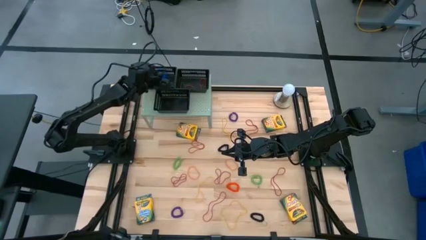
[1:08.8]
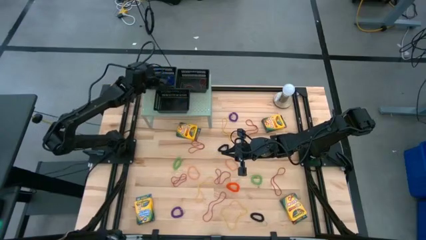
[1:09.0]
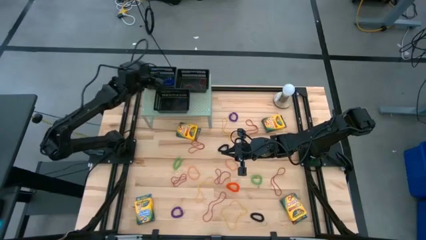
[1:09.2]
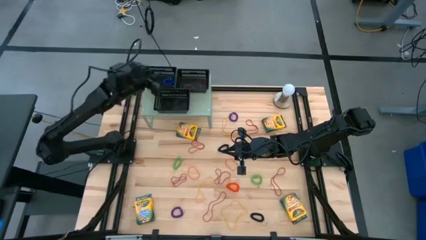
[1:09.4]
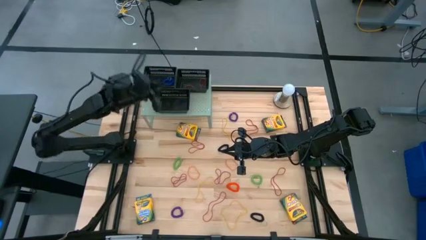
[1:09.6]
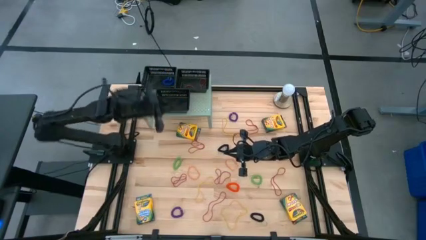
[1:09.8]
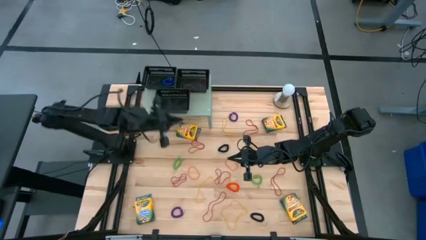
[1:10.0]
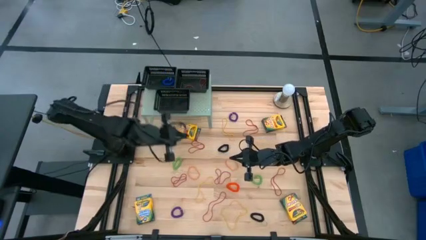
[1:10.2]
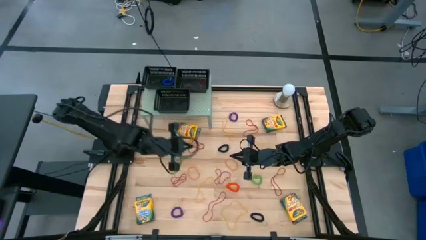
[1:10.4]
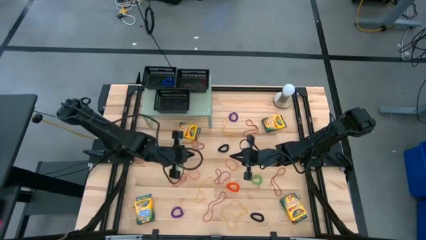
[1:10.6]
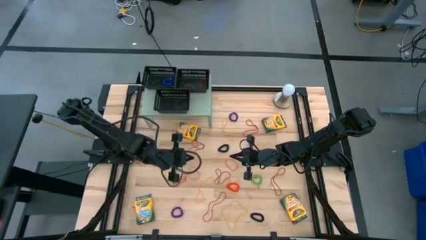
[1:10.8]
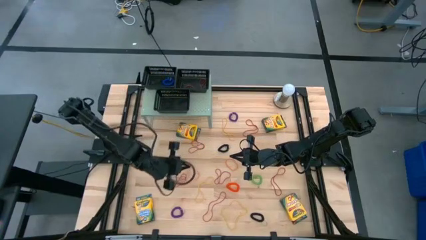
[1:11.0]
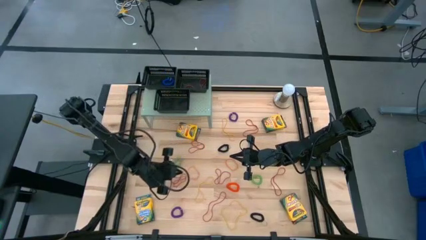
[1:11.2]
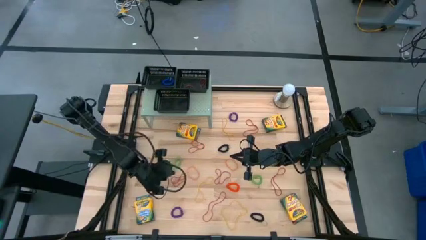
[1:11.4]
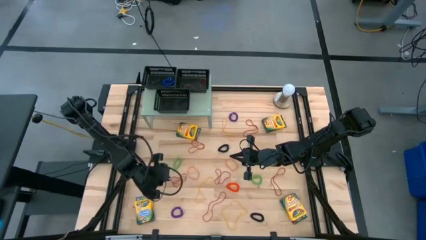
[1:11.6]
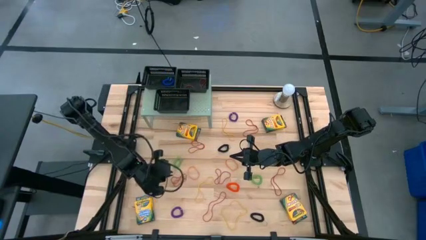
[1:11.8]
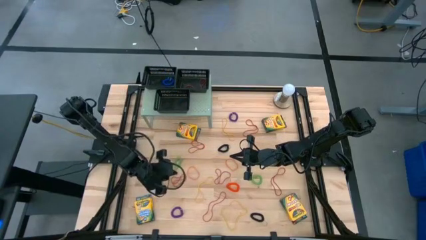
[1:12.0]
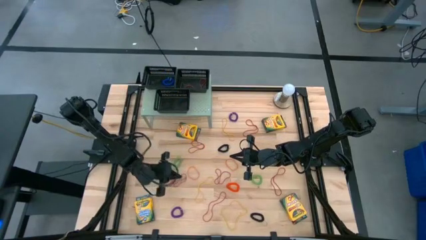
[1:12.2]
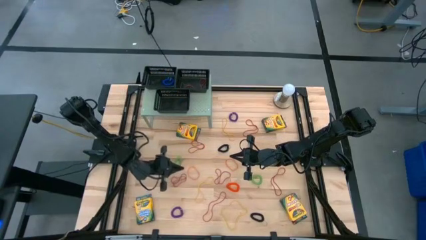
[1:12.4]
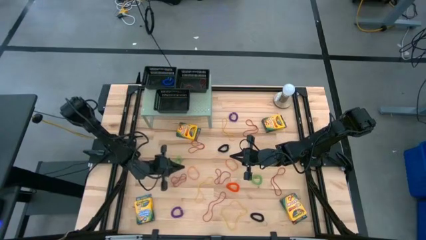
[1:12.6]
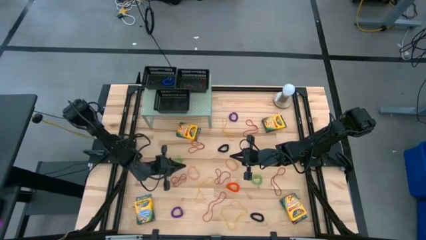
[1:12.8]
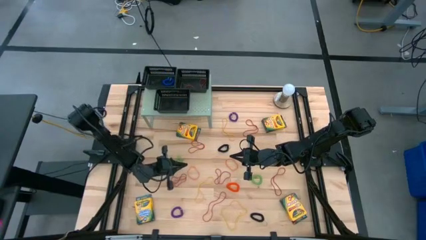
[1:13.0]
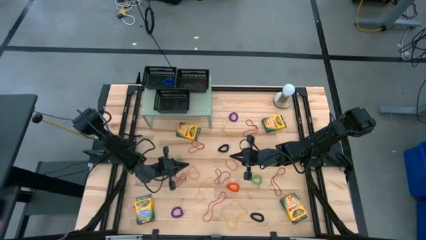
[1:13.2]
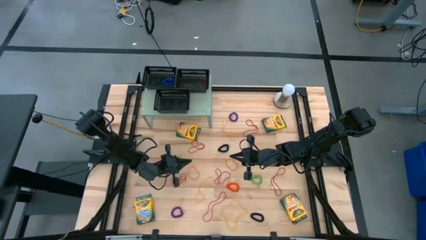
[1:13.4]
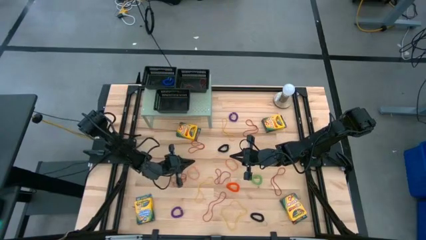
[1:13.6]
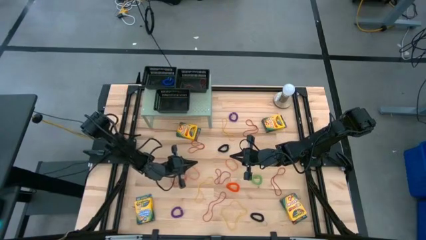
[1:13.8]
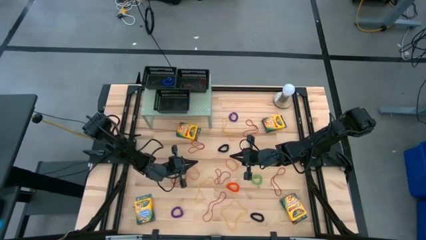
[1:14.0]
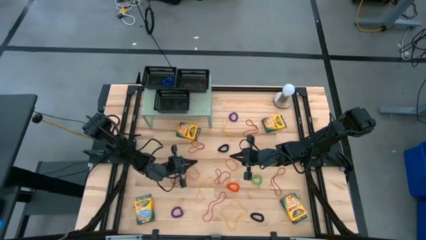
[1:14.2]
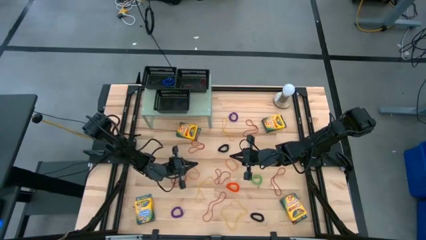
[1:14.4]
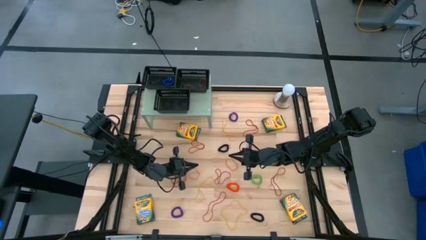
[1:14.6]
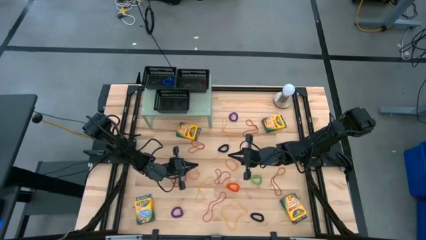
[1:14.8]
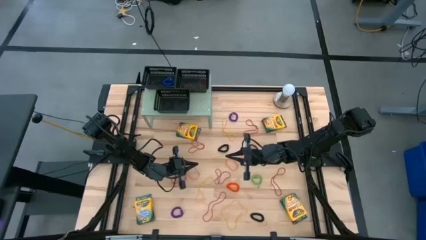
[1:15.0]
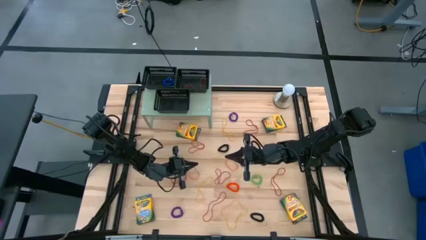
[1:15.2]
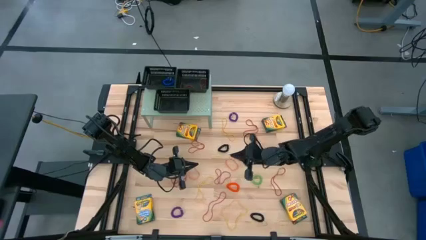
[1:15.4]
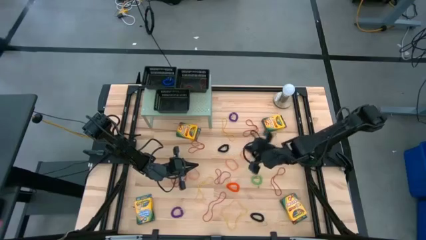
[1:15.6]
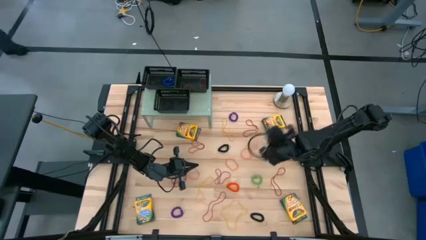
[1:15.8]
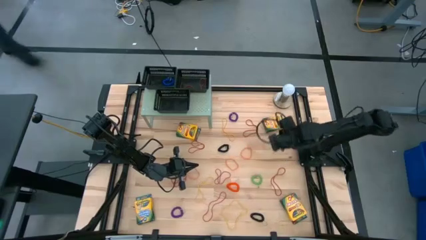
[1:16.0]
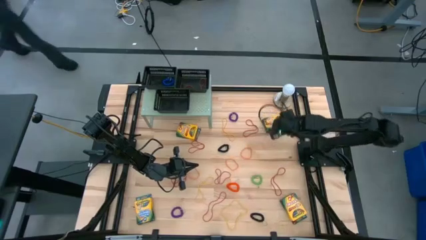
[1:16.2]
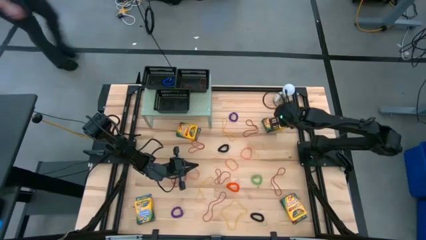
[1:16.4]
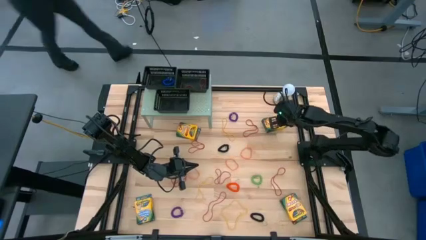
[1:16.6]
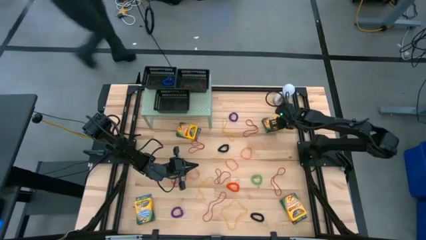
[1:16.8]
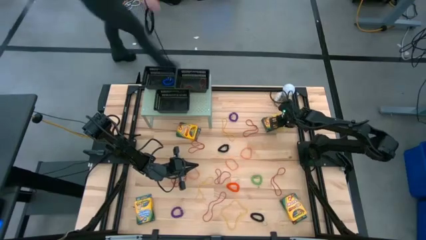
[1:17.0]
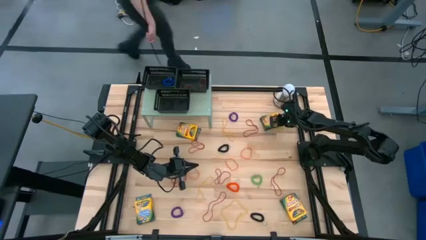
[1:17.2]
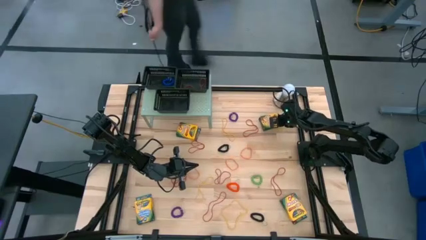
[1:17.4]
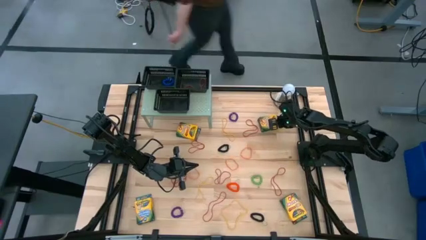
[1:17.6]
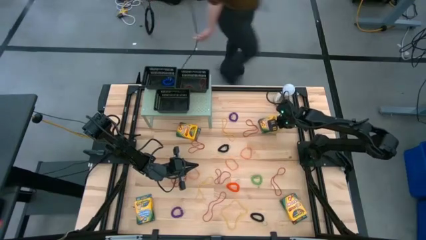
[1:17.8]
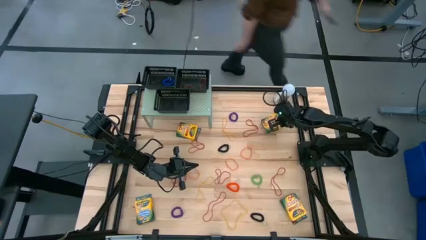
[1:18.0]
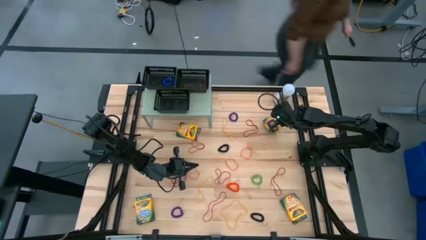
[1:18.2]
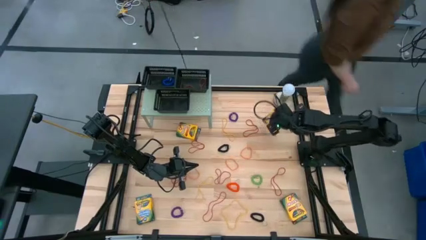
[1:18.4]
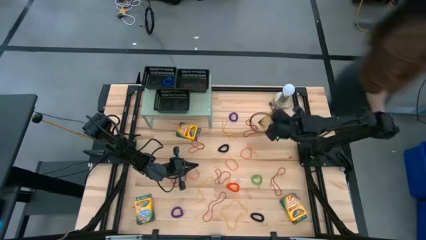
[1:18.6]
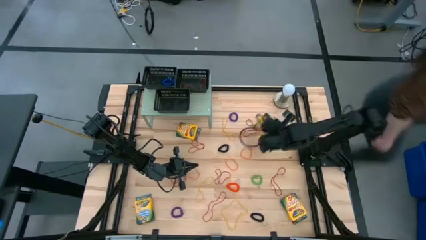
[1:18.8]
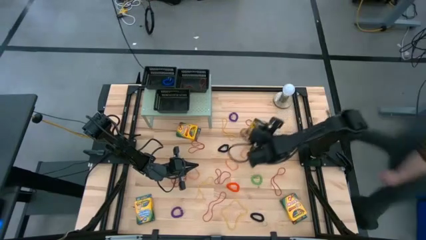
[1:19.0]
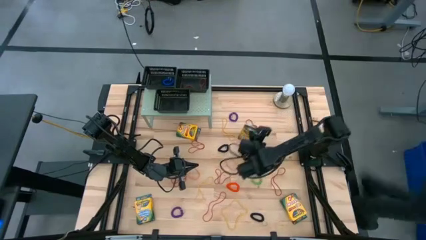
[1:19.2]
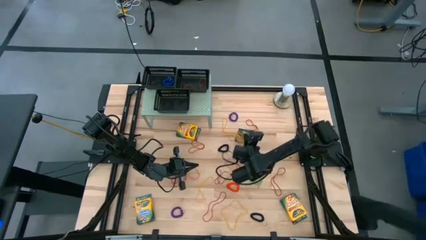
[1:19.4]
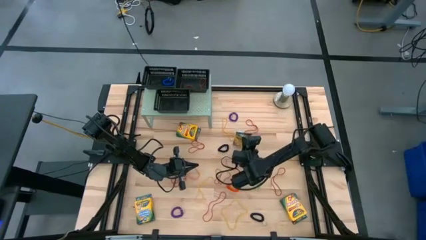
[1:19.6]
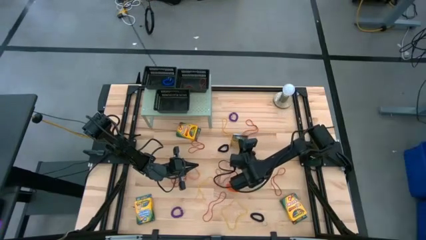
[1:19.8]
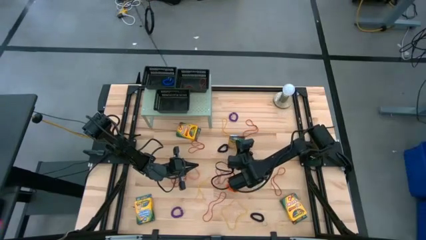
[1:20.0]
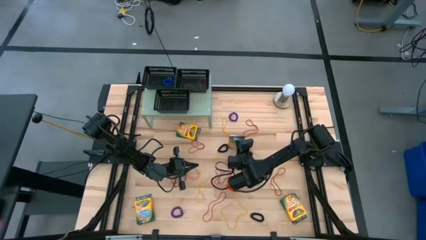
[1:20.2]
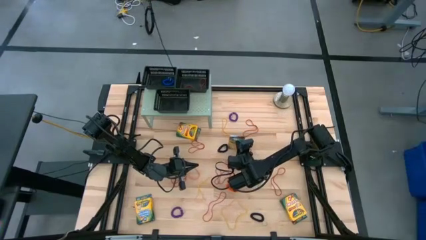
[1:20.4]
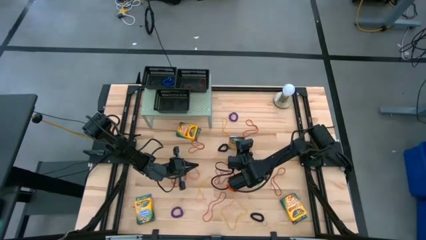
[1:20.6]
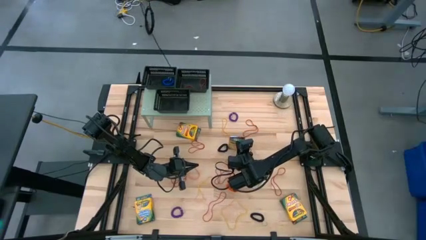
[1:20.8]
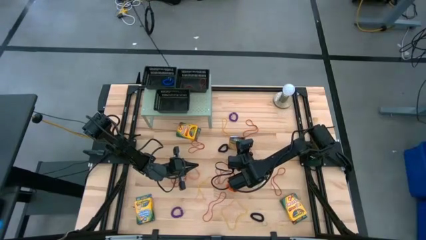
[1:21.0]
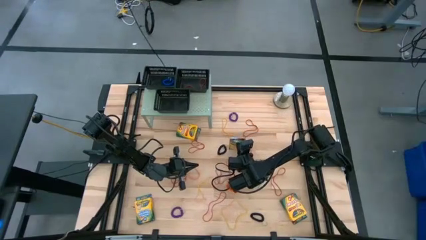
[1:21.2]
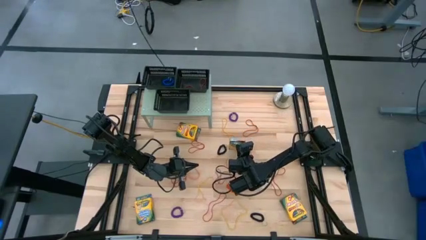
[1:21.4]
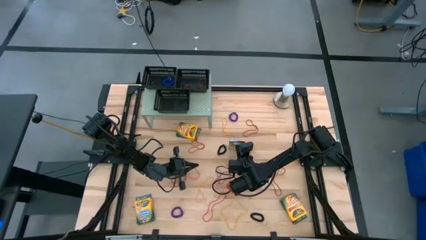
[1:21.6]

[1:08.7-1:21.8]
Task: Pick & Place Office Desk Supplies
Put the yellow crayon box into the bottom black bin

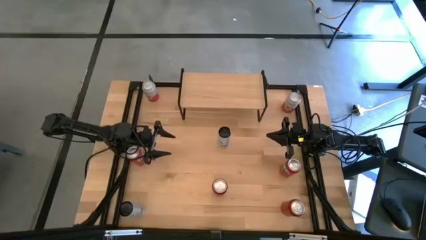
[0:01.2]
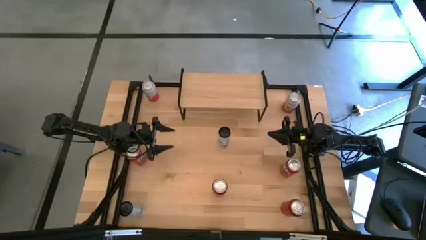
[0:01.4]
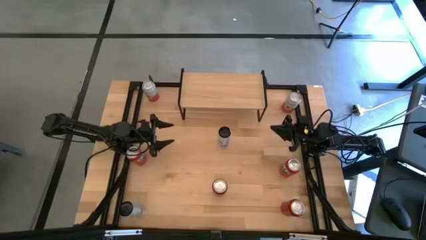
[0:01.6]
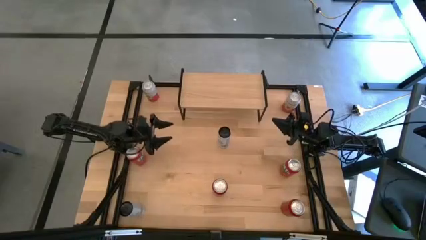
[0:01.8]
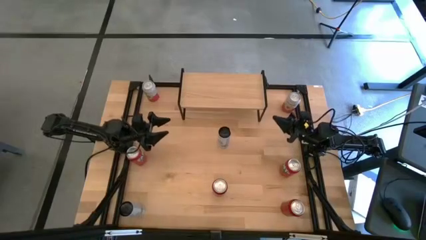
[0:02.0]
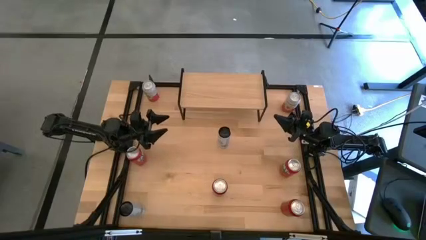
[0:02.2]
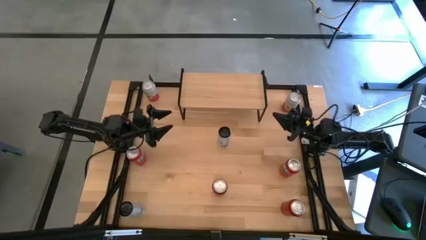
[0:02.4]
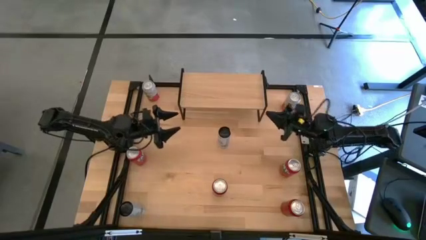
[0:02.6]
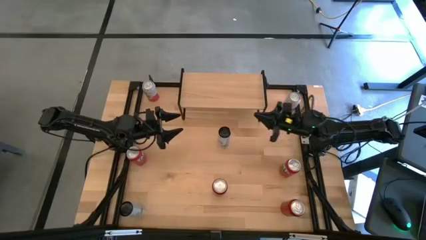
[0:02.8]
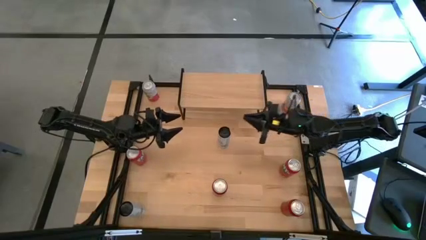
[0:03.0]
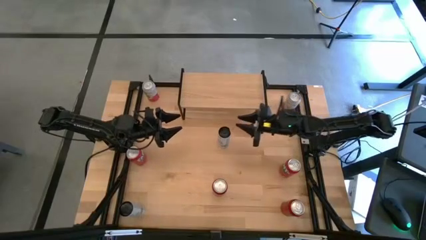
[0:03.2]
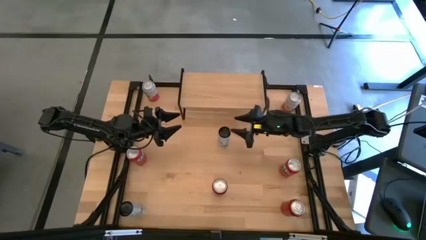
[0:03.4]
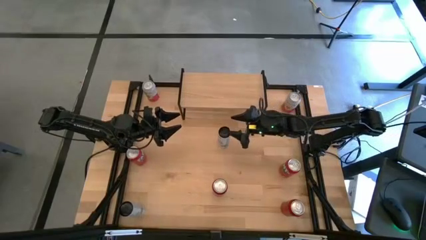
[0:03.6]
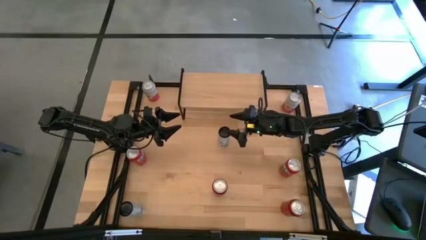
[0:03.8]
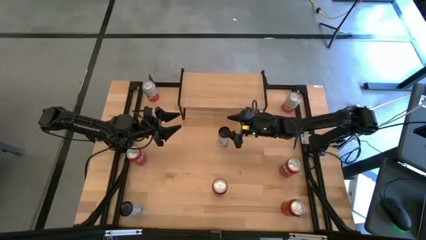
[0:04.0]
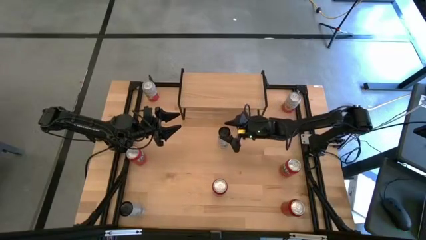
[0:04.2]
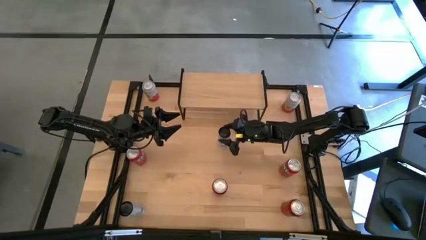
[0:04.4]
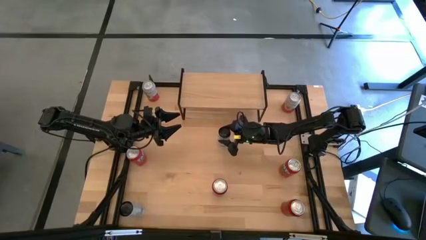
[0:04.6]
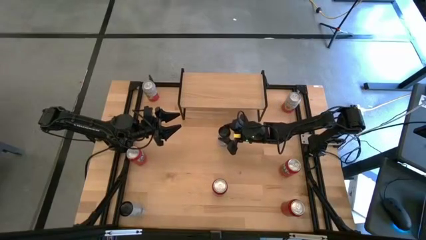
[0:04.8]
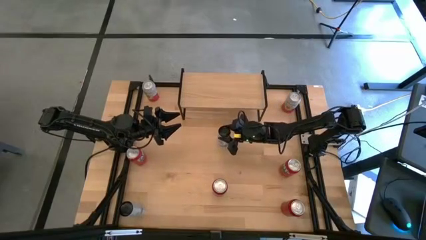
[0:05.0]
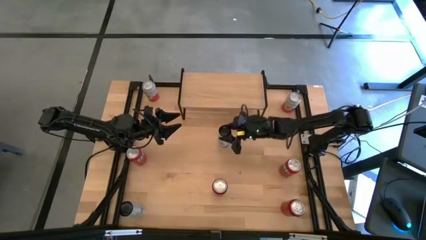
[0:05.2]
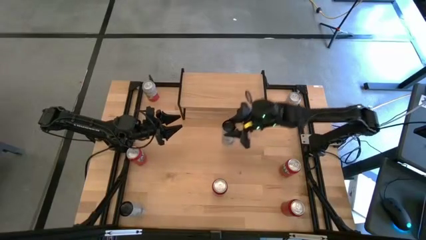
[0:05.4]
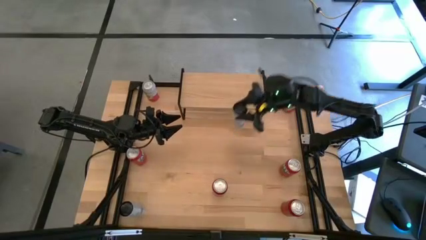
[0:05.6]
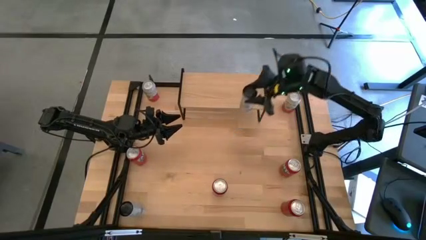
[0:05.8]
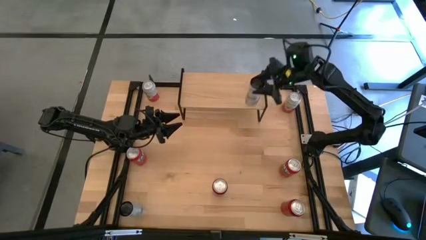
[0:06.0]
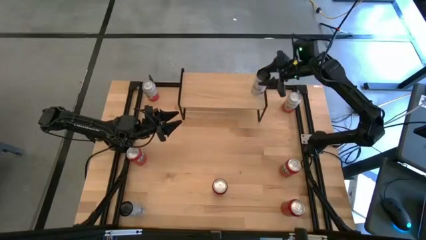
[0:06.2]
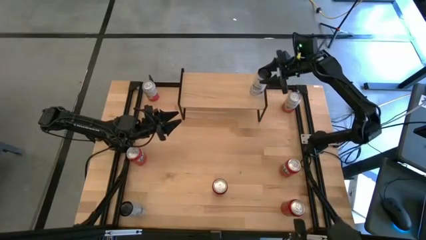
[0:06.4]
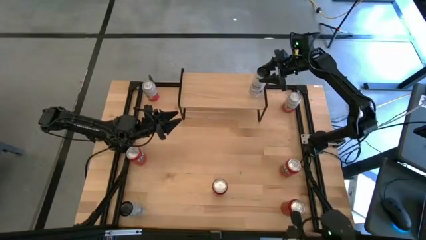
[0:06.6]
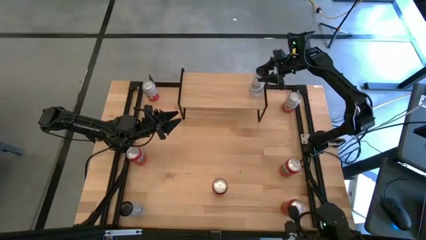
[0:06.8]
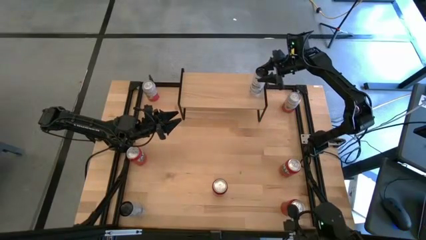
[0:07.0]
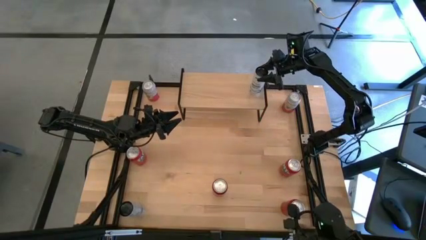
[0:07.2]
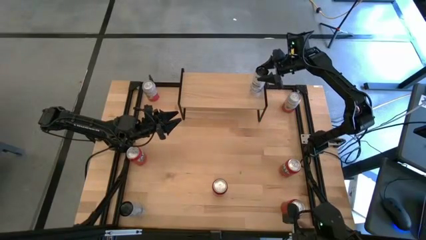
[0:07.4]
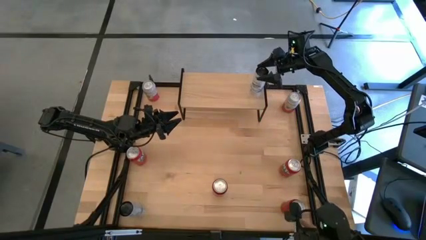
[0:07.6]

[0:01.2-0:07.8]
Task: Place canned beverage on shelf
Put the top white-blue soda can on the shelf
